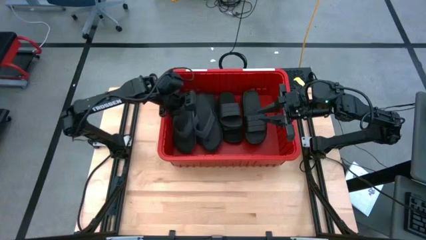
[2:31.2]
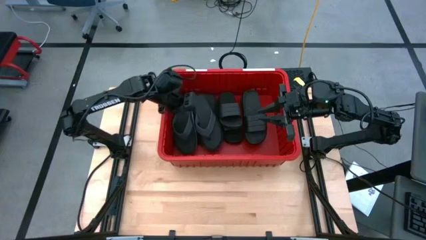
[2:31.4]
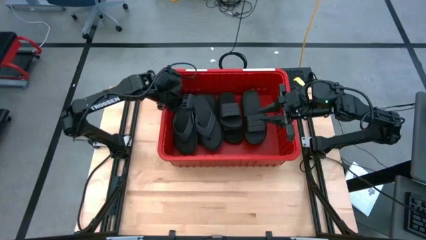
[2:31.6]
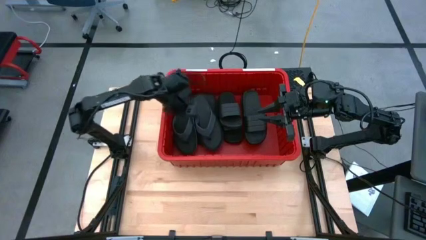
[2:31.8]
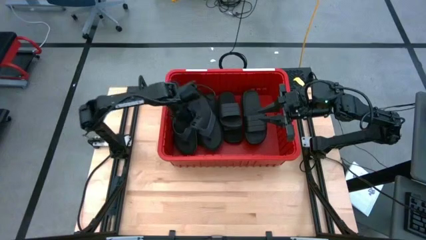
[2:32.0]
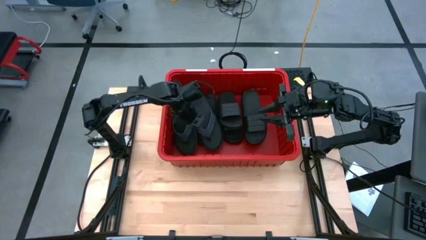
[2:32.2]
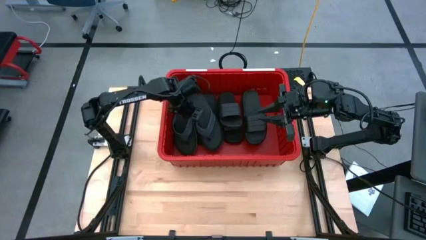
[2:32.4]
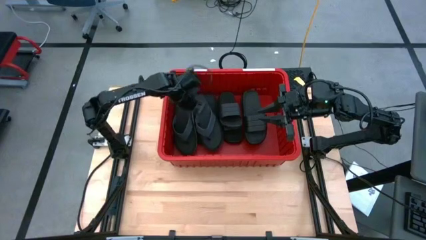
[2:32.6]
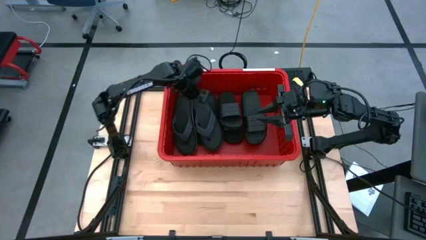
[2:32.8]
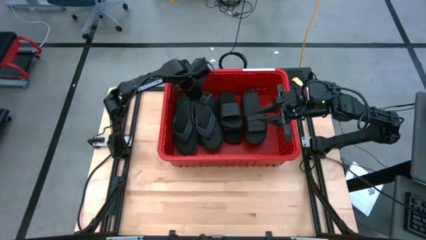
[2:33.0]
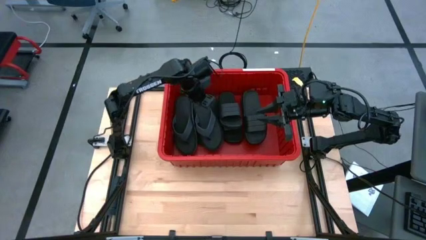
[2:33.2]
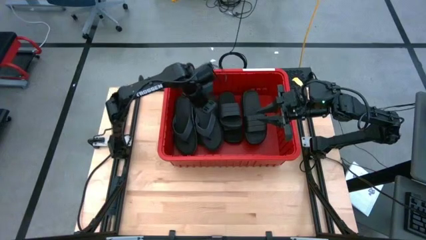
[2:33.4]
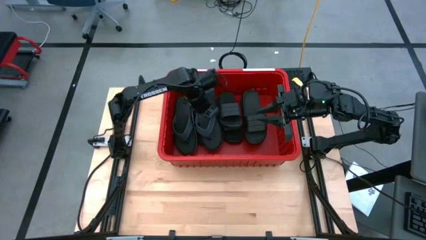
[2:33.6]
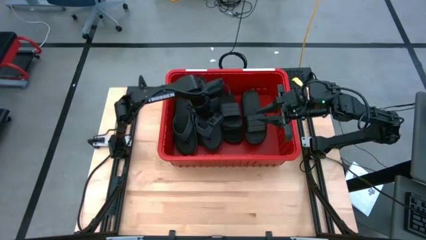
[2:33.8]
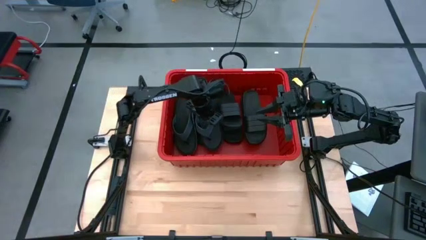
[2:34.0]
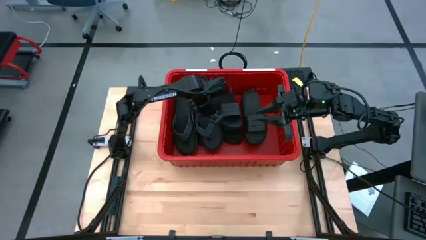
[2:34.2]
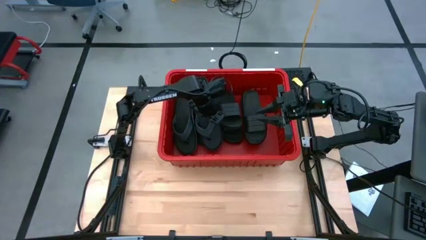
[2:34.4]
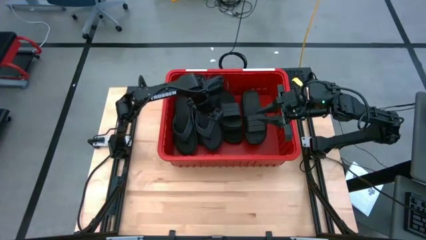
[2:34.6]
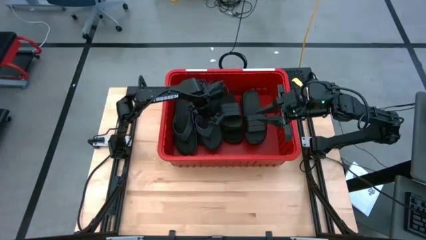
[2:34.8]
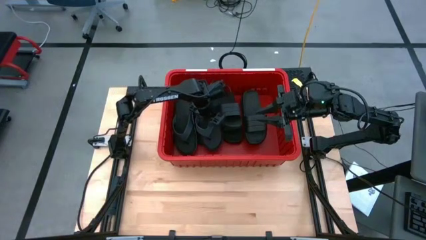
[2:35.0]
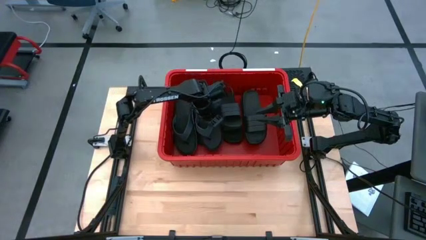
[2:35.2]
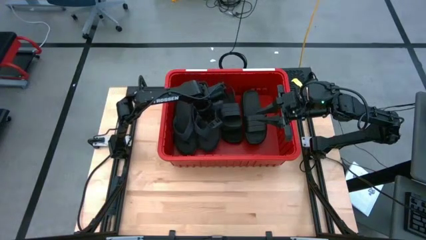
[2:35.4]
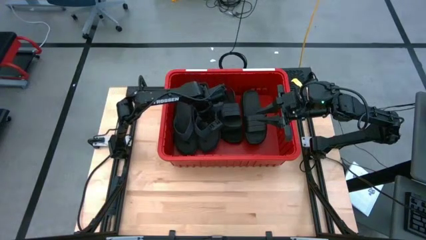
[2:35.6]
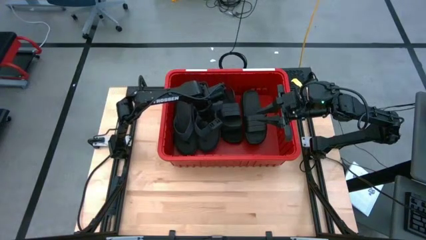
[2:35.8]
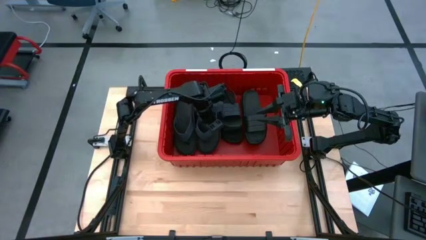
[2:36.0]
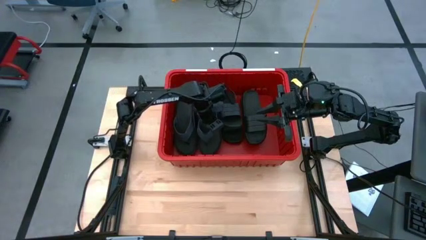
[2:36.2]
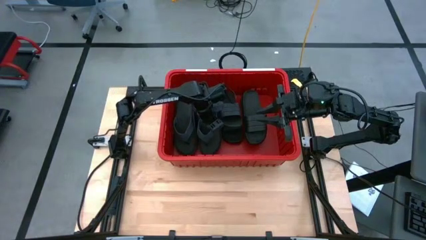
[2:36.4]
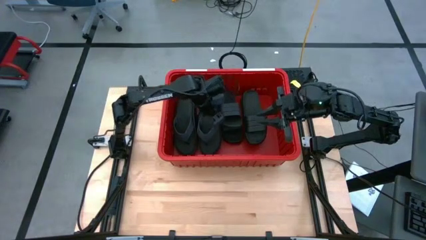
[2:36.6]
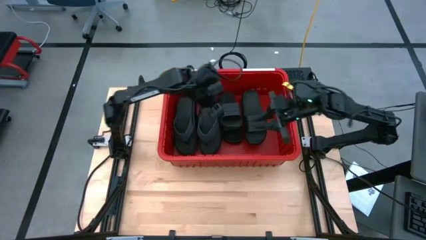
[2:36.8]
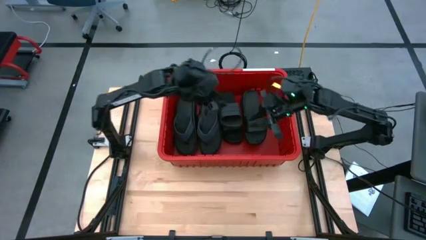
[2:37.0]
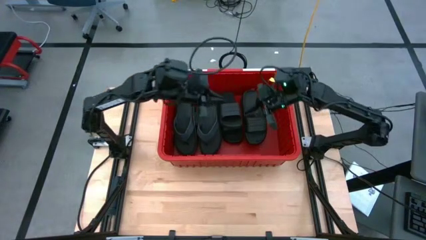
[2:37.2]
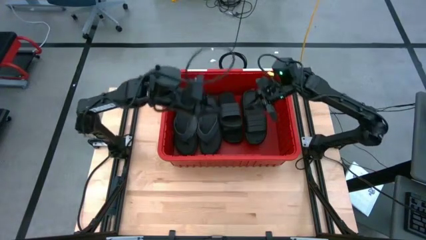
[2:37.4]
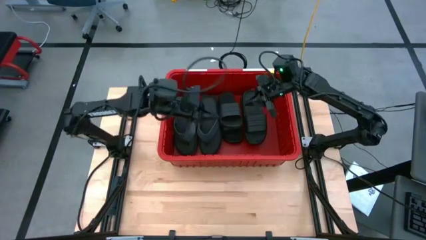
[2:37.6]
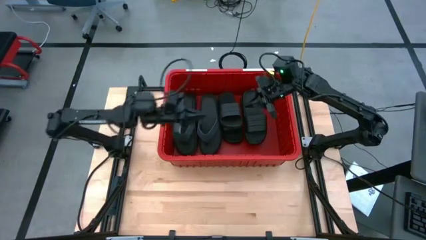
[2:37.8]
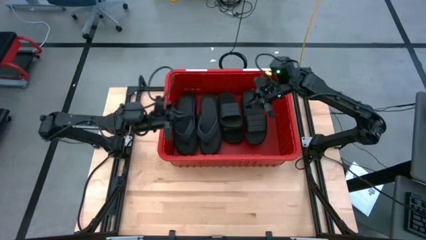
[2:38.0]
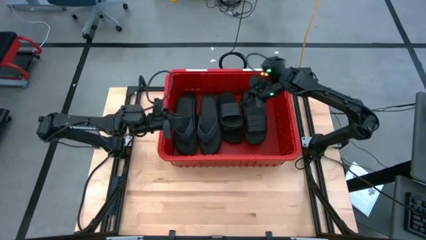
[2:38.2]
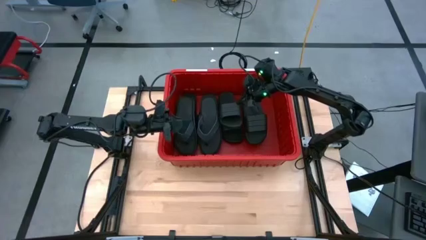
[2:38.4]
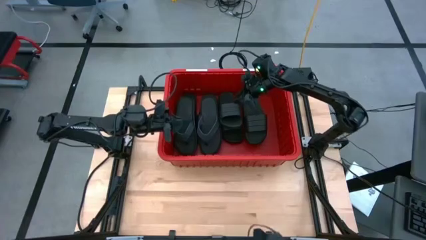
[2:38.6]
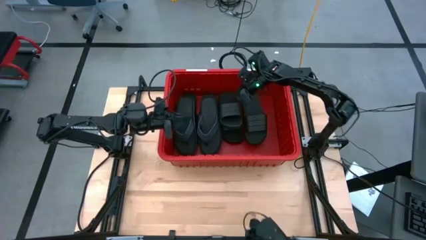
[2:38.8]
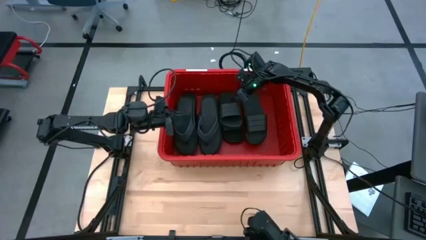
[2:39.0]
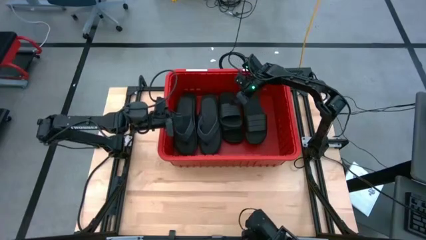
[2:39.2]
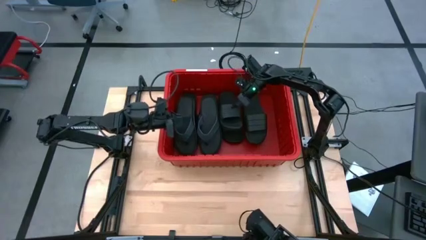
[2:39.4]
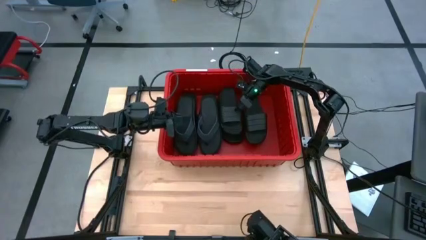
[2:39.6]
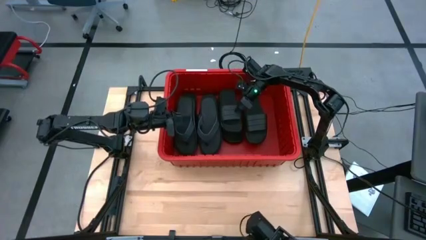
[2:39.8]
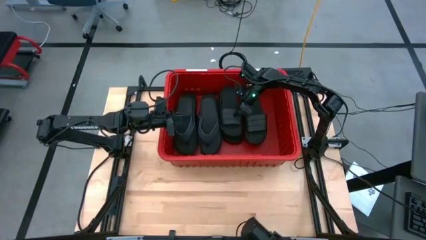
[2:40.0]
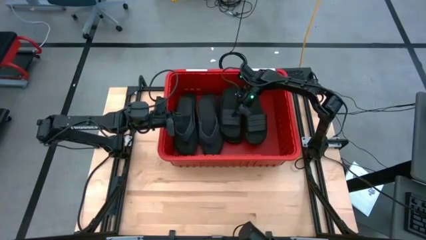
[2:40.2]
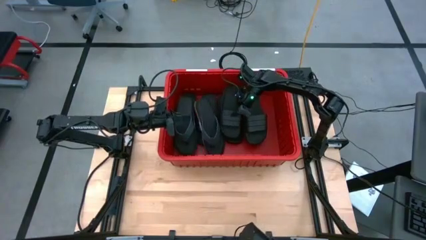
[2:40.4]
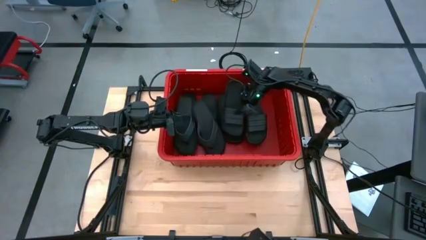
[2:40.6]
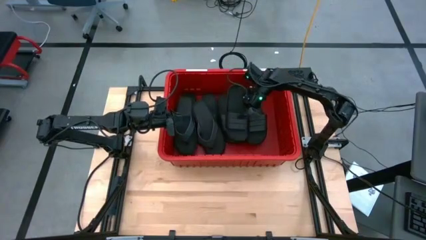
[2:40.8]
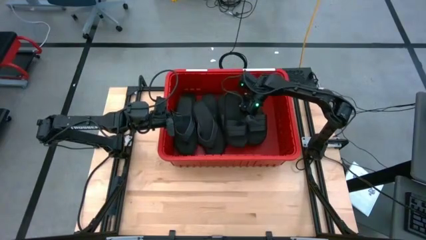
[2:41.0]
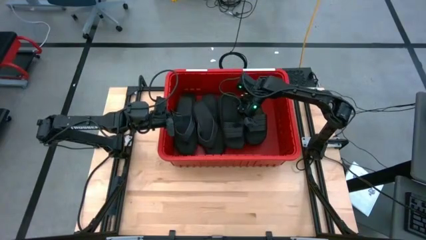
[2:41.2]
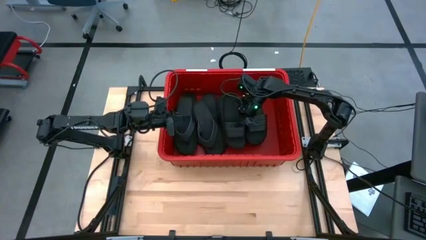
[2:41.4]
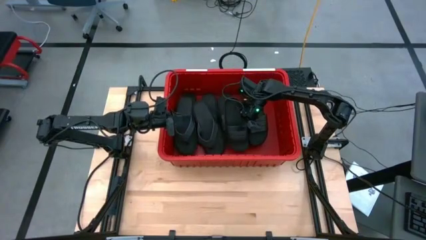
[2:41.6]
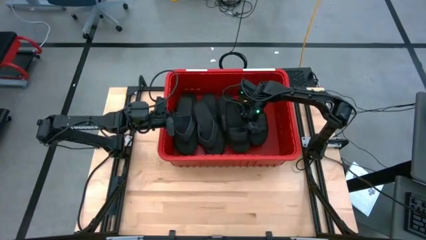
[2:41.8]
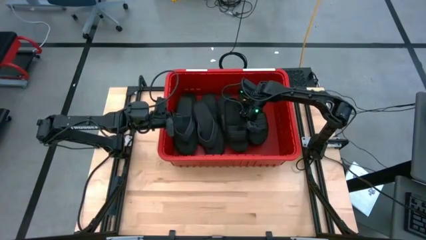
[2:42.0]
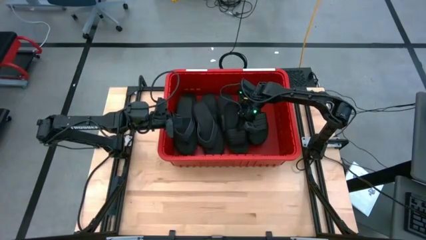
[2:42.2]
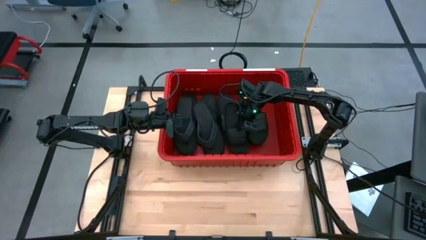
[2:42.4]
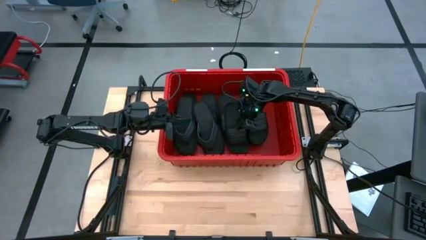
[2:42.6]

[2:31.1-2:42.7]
Task: Pick and place slides into bin
Adjust the slides in the red bin
